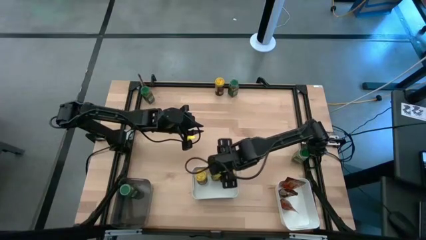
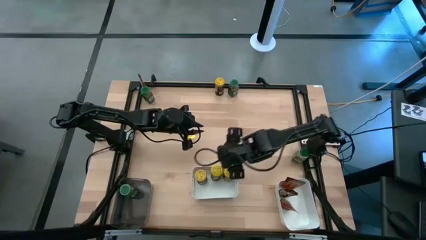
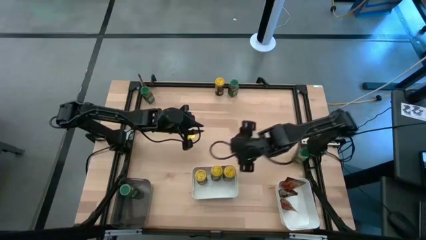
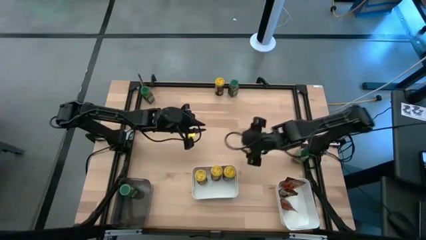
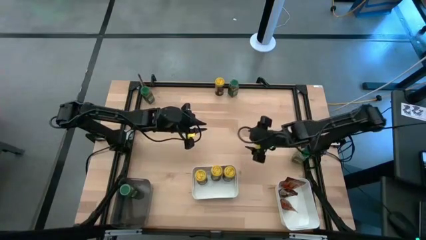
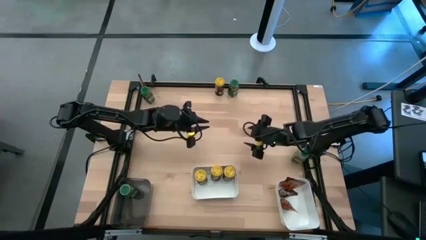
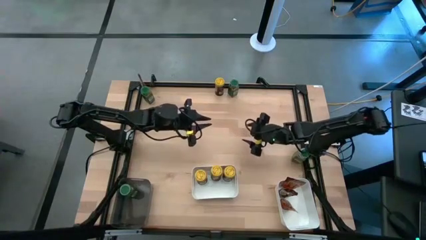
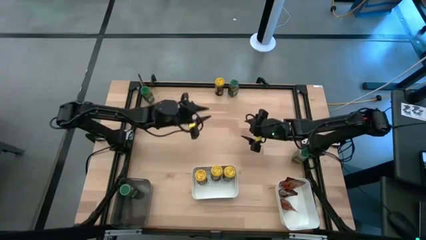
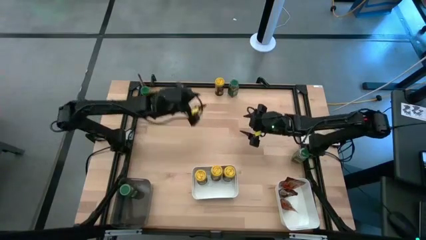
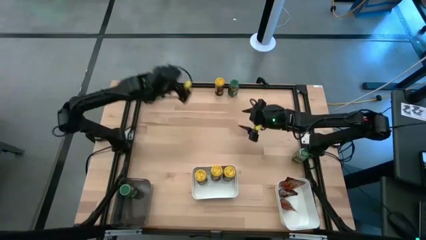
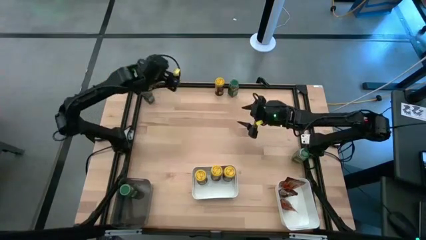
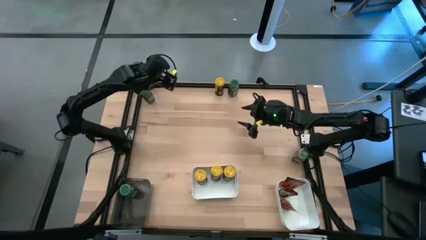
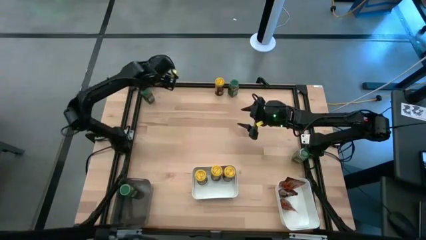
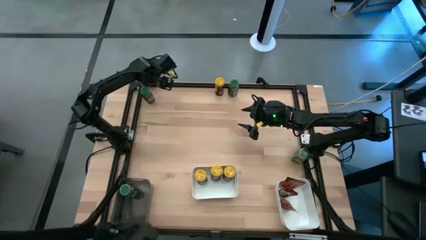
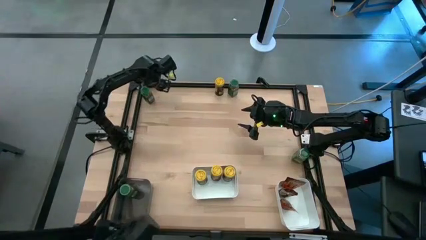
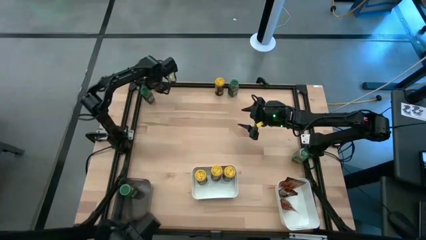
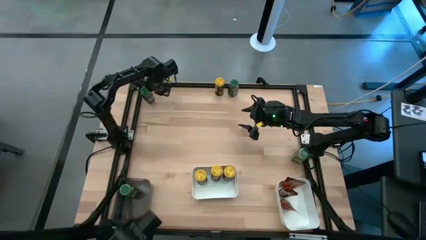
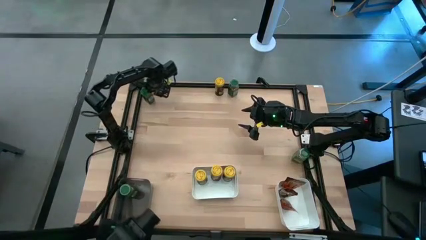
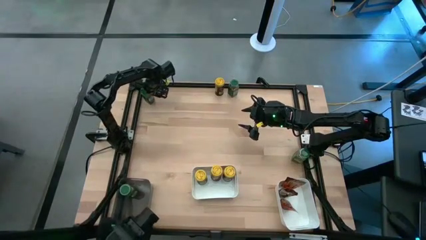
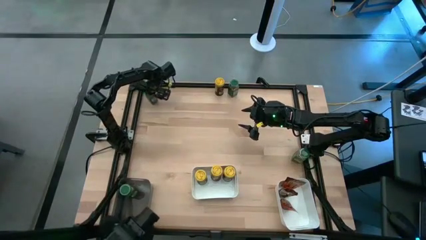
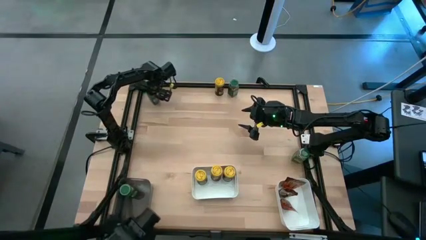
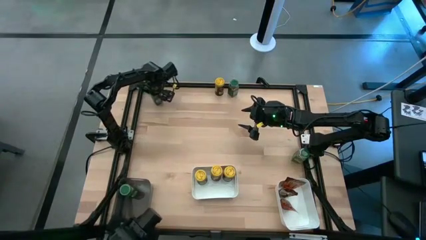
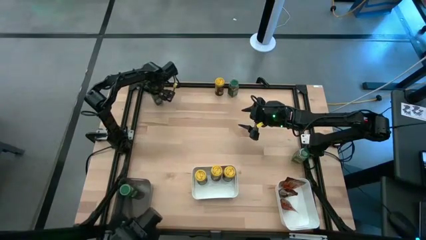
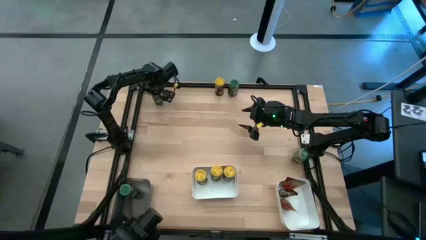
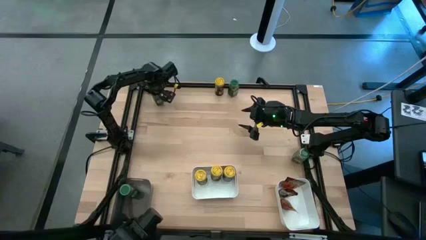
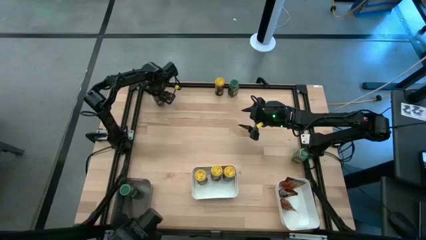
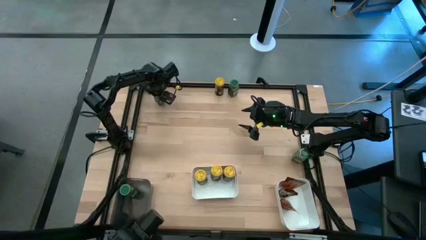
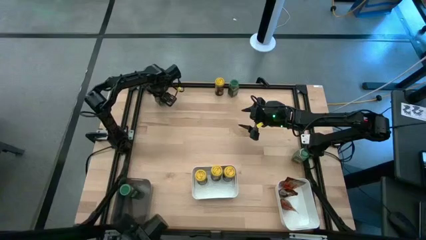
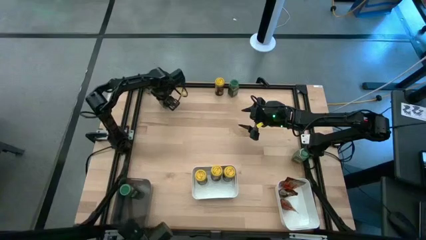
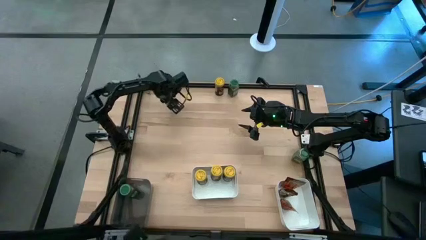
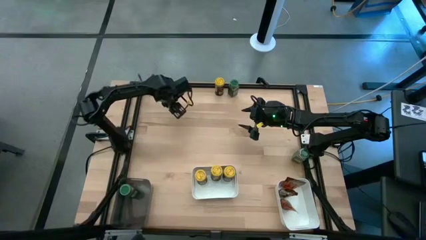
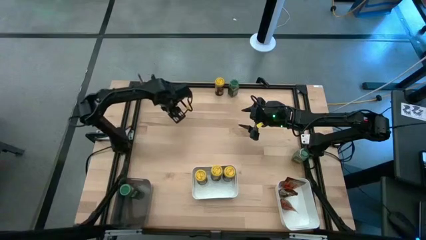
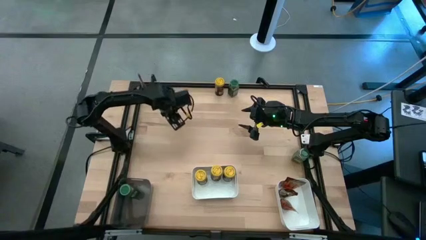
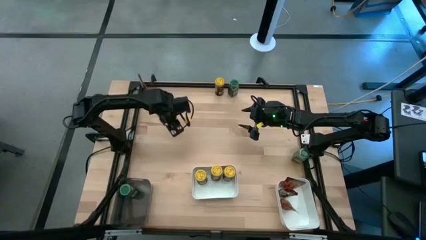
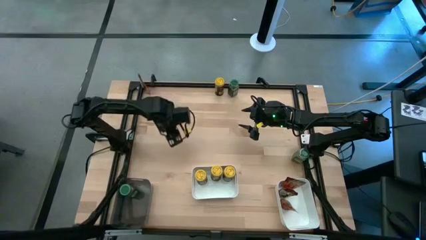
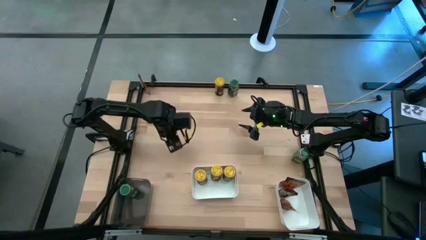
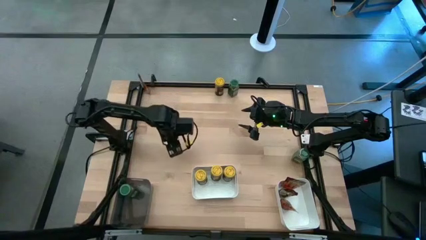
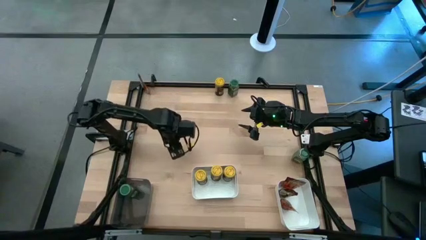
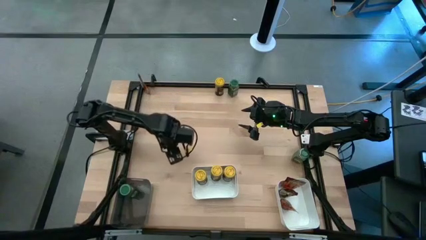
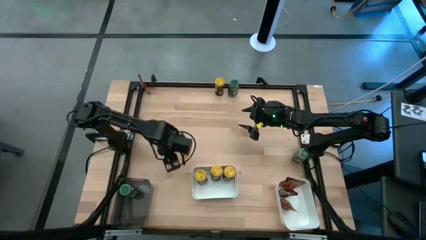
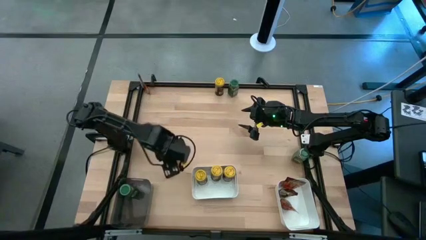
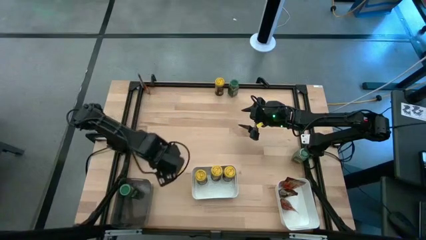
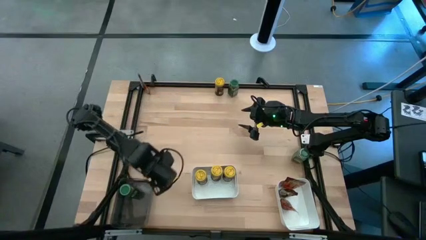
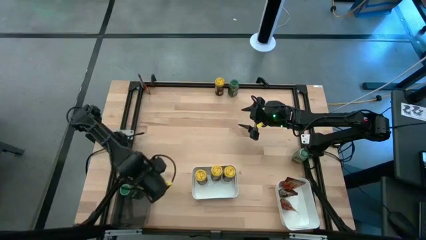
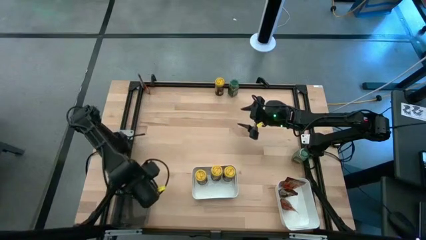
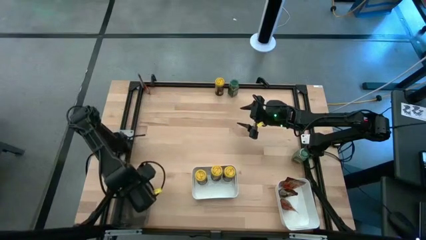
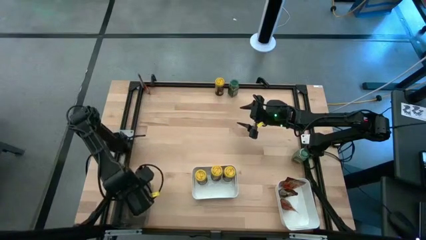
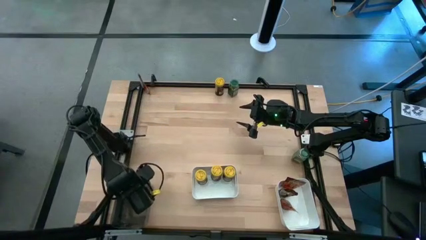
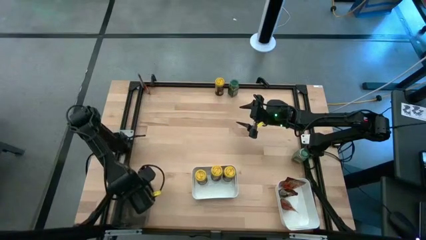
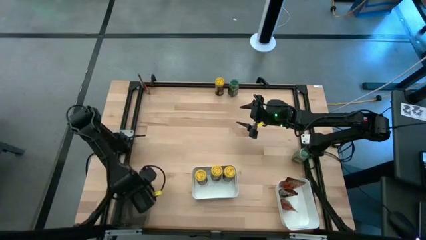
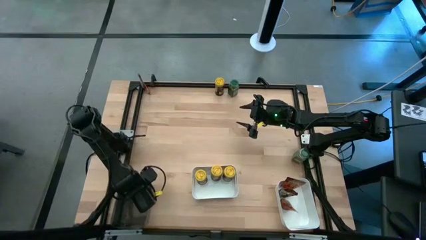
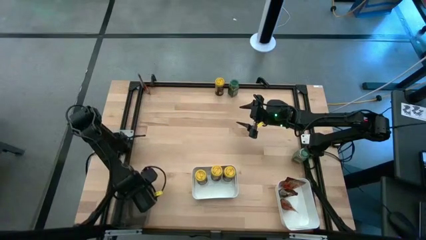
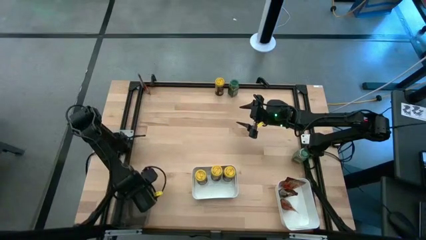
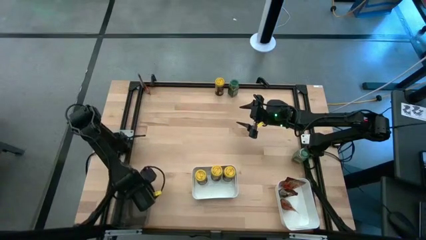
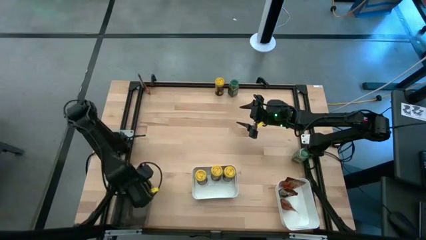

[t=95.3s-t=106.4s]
Task: Sort spices by type
Put the top left green seasoning bottle into the black bin

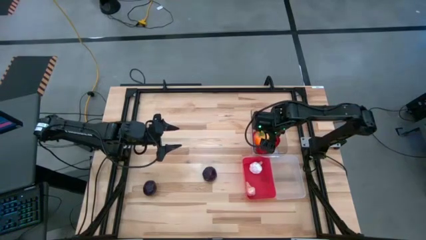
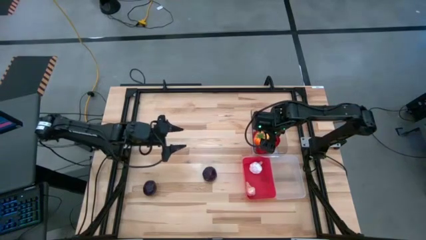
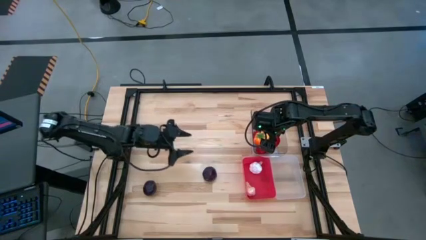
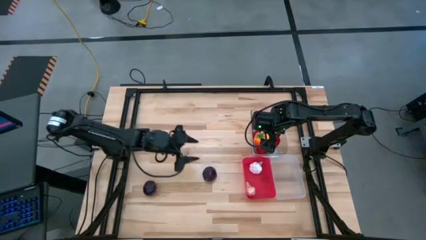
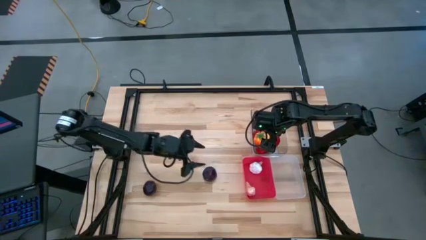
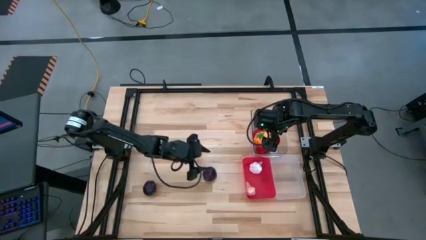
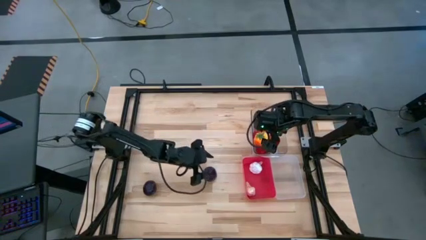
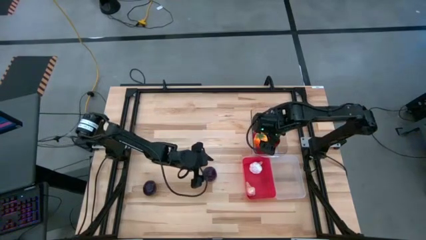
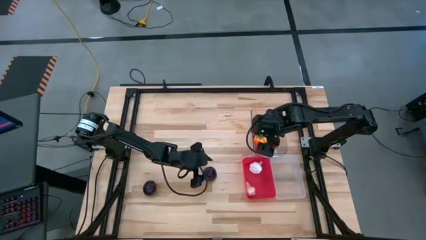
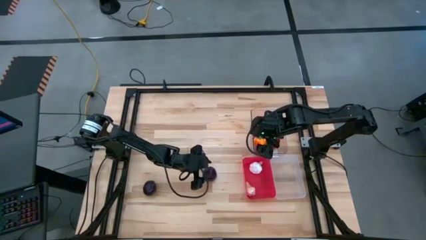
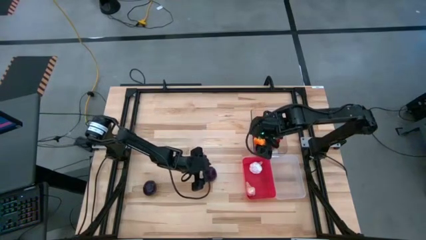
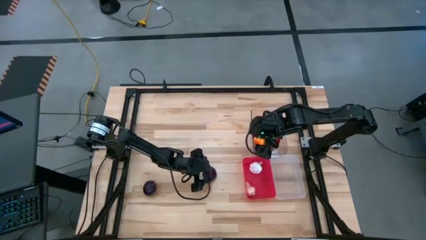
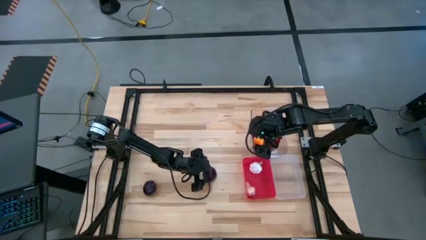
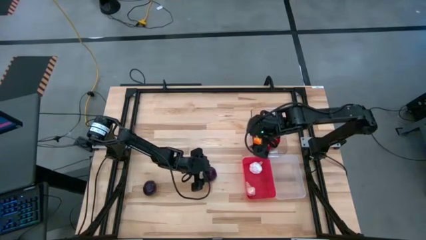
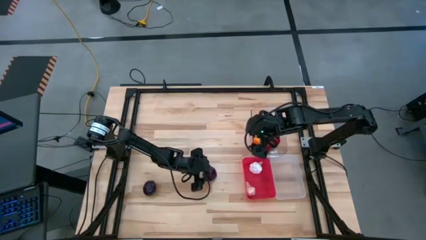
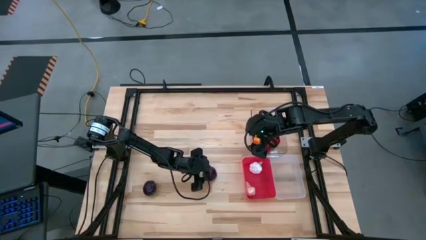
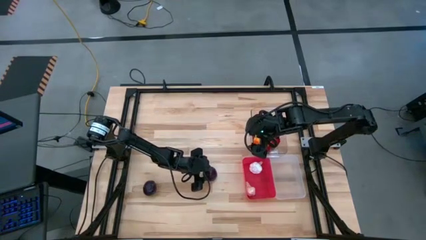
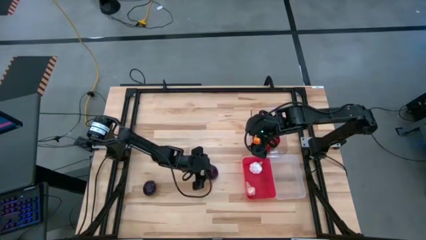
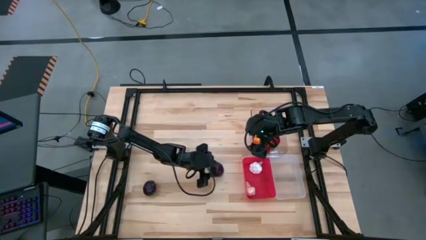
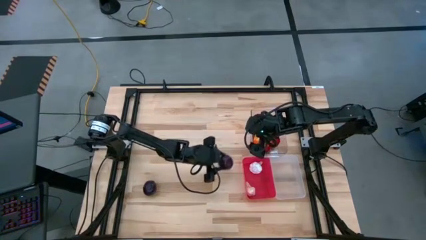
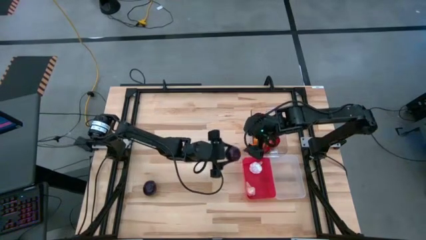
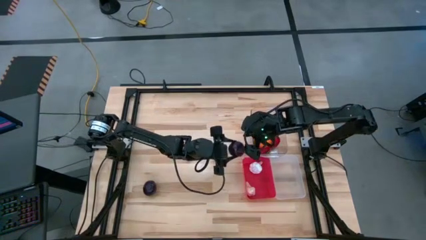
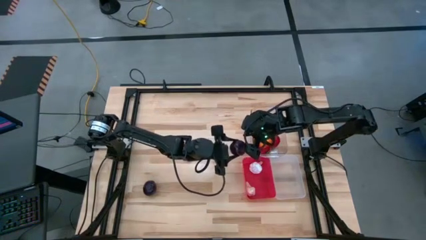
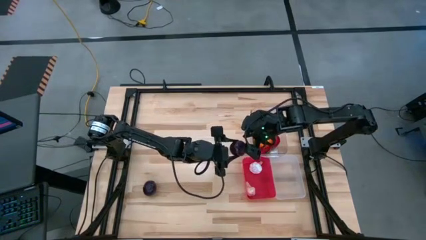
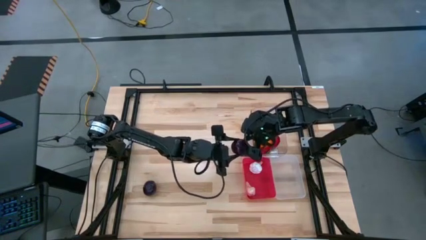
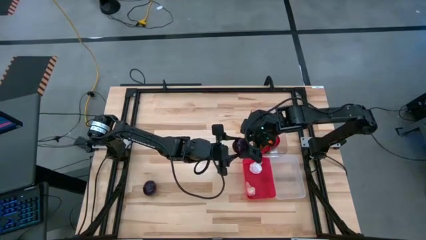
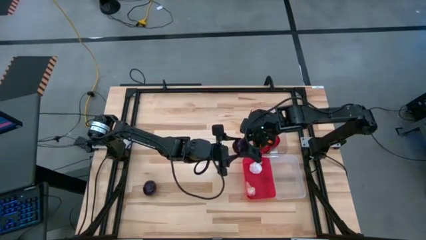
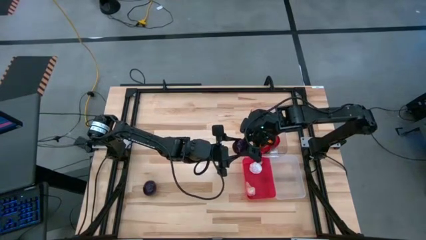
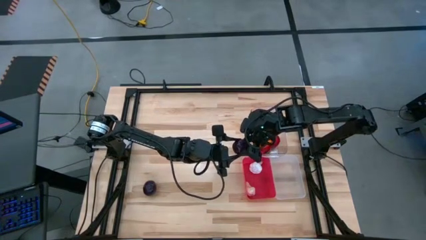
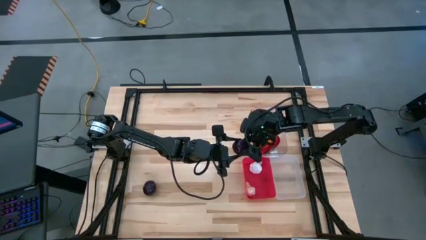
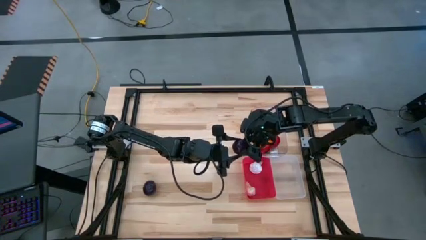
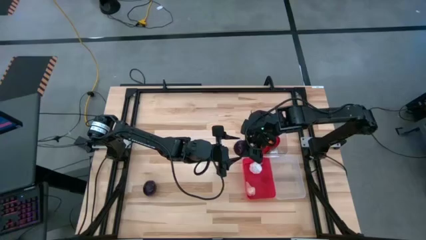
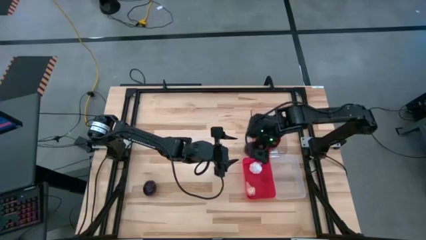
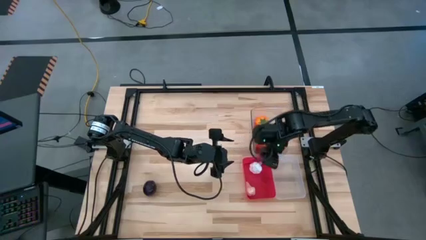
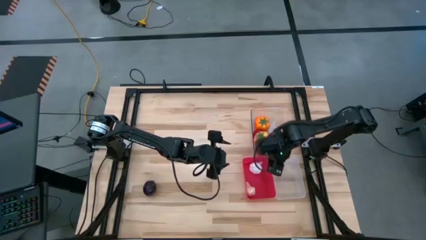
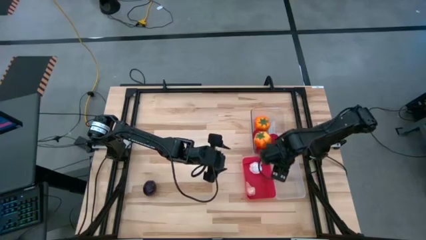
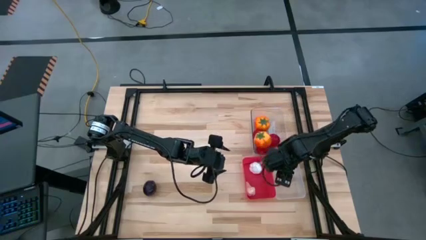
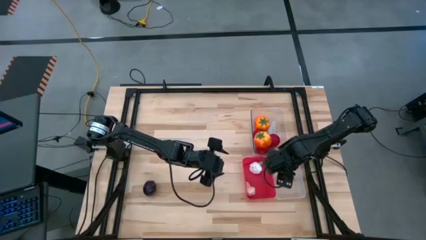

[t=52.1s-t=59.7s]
Task: Sort produce into baskets
Put the right plum into the bottom transparent bin
